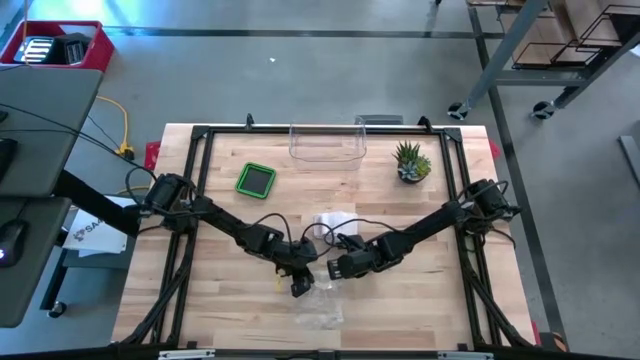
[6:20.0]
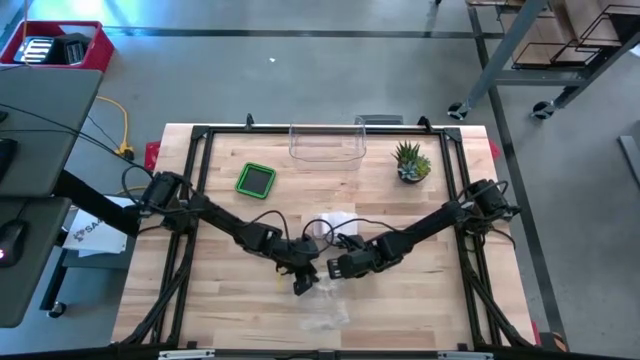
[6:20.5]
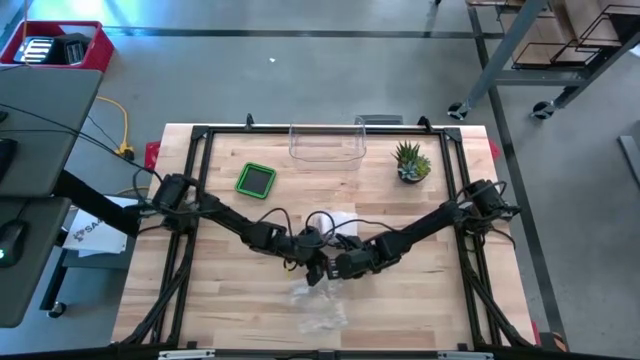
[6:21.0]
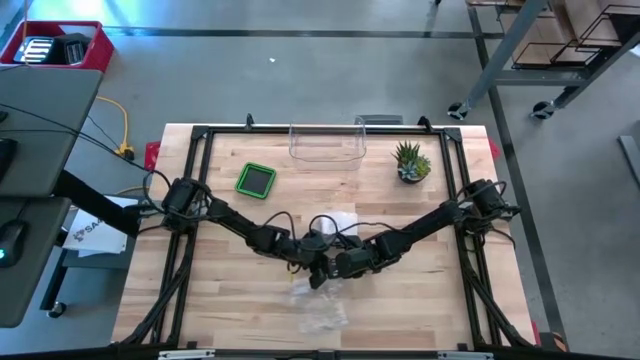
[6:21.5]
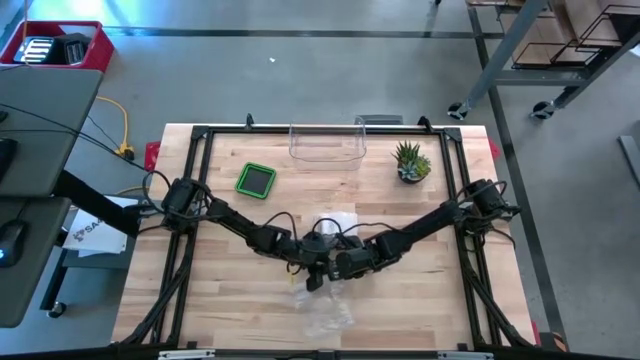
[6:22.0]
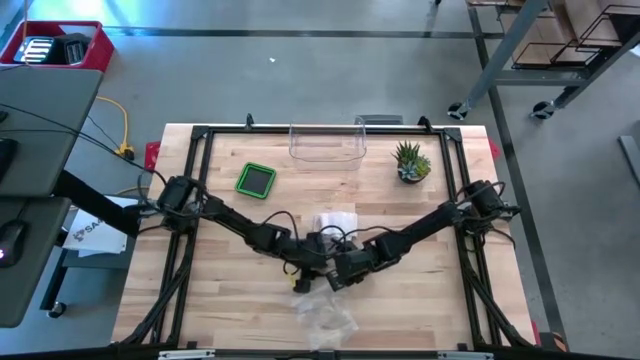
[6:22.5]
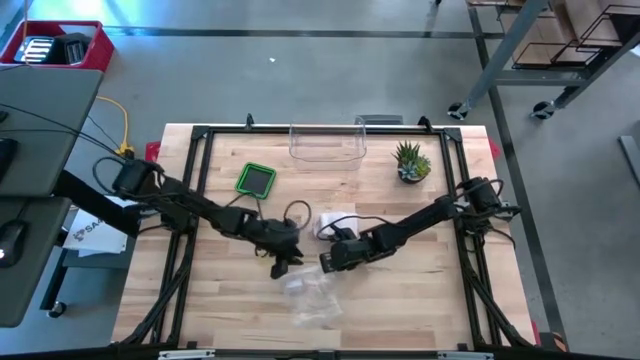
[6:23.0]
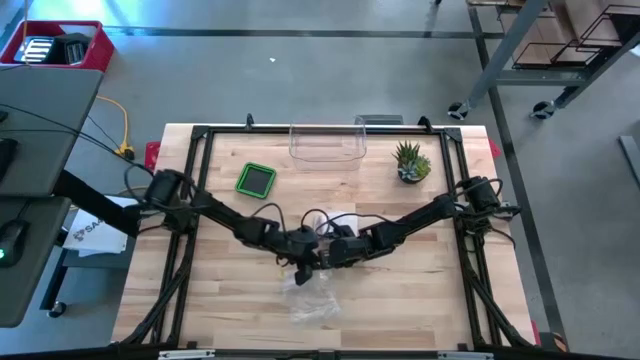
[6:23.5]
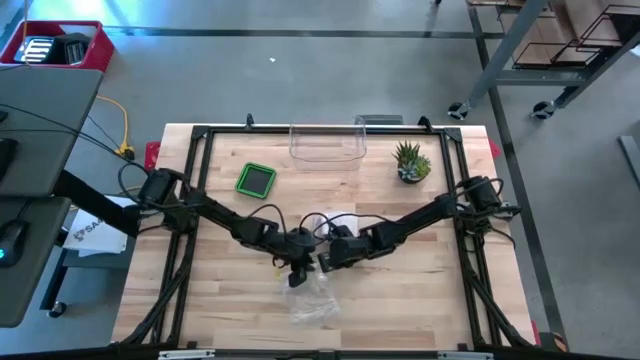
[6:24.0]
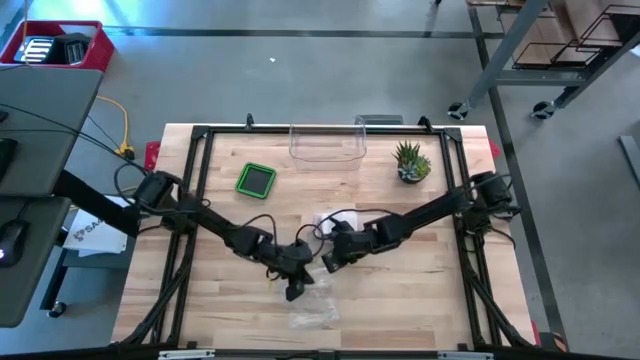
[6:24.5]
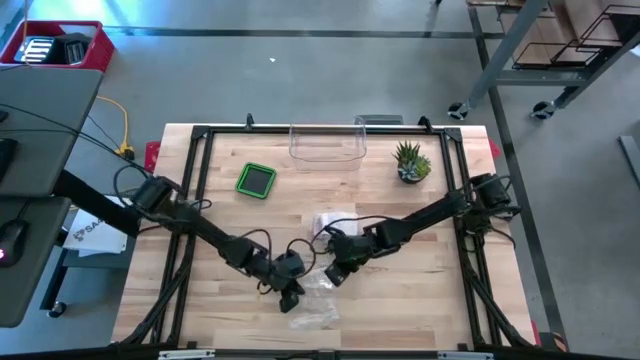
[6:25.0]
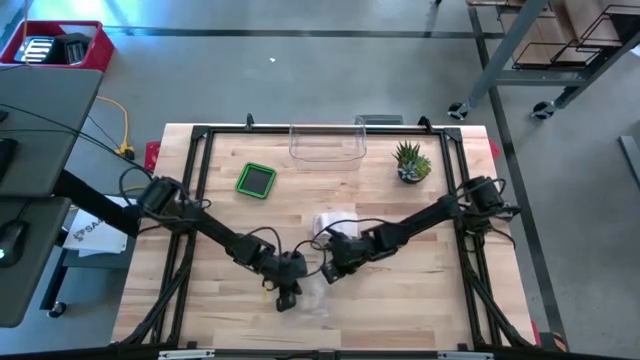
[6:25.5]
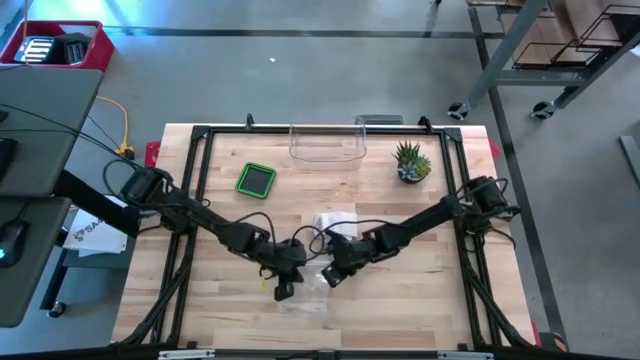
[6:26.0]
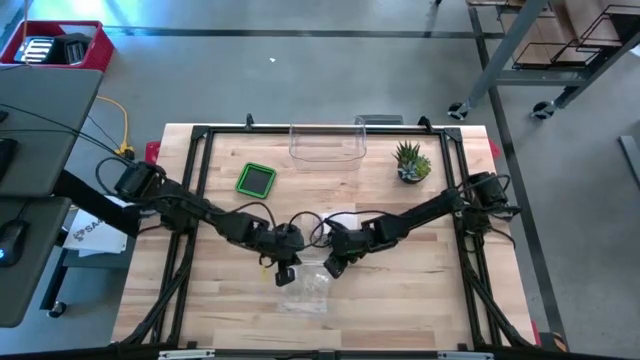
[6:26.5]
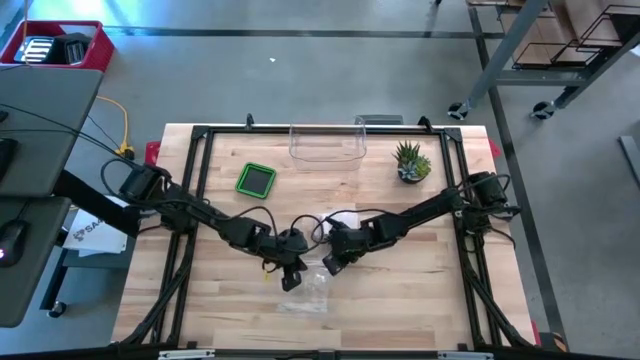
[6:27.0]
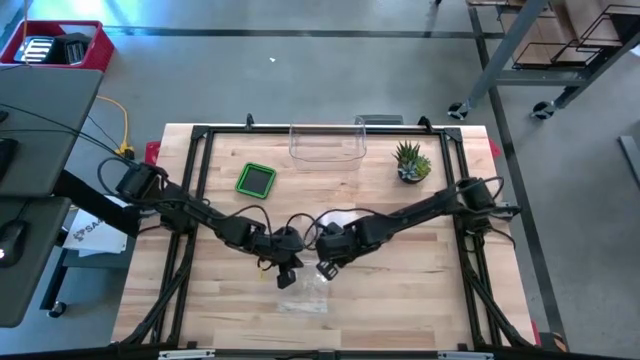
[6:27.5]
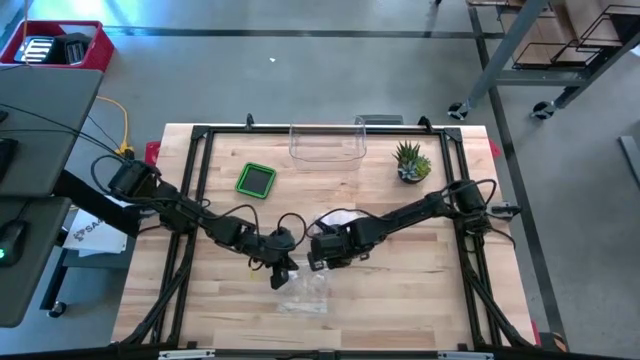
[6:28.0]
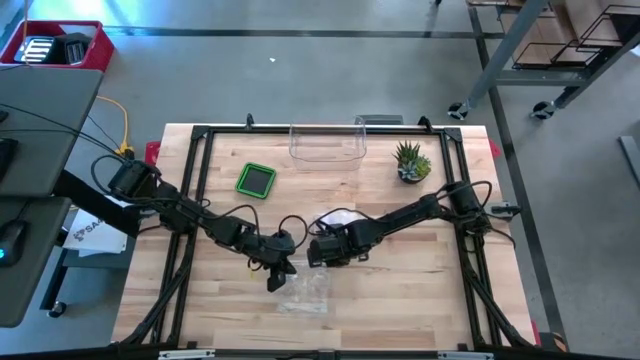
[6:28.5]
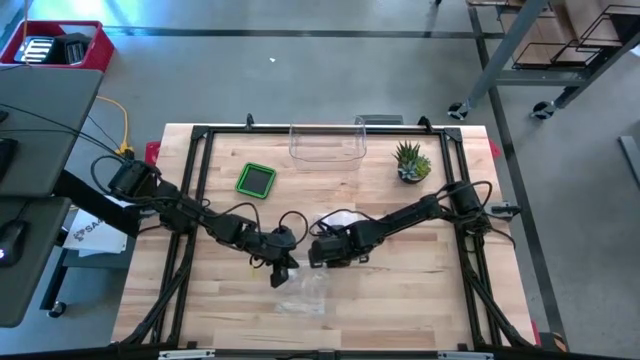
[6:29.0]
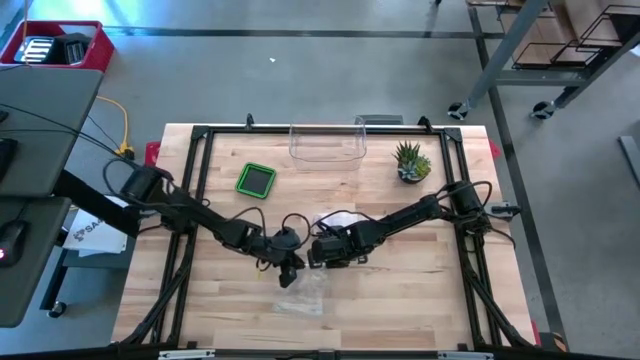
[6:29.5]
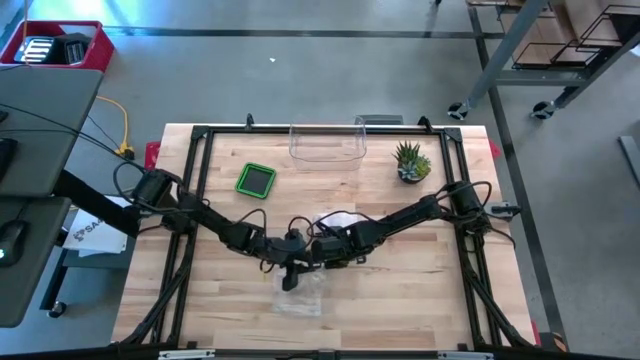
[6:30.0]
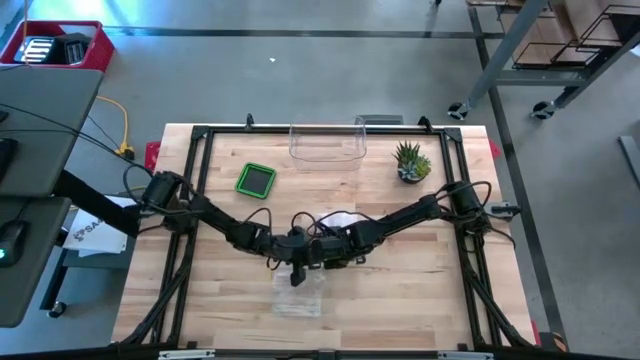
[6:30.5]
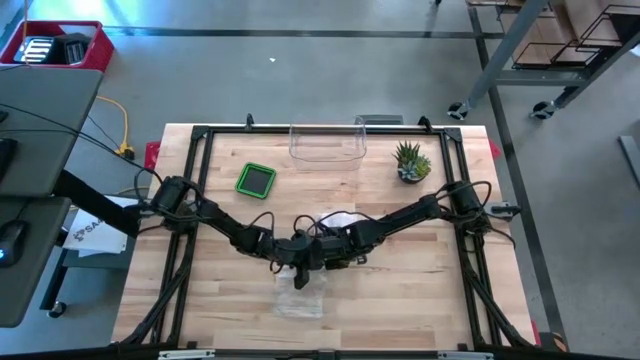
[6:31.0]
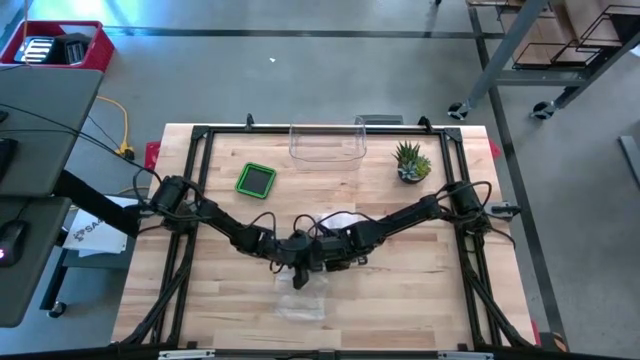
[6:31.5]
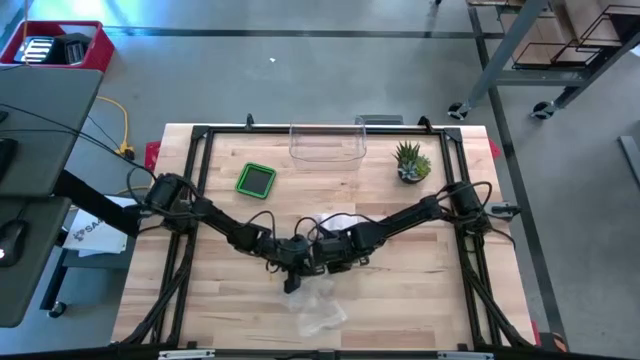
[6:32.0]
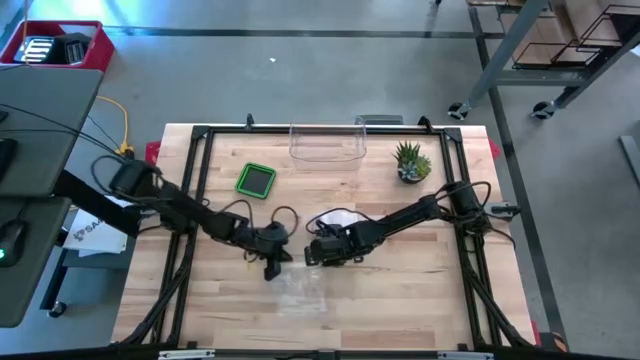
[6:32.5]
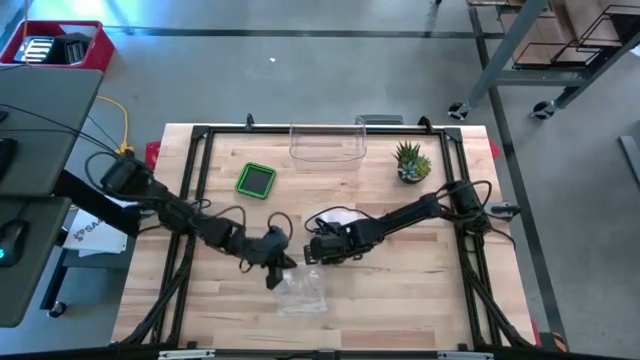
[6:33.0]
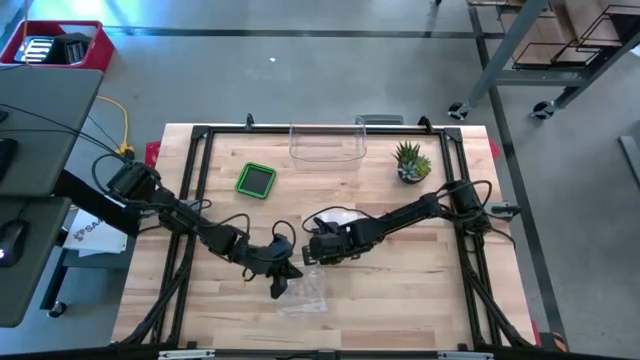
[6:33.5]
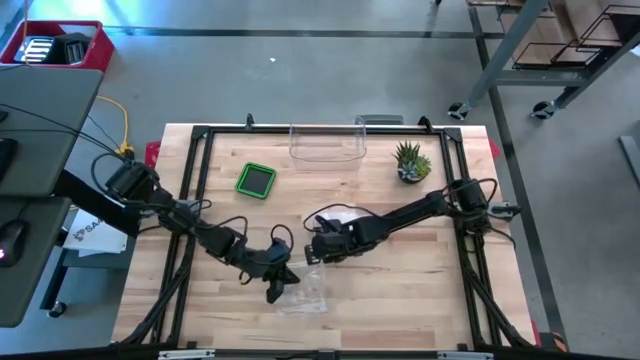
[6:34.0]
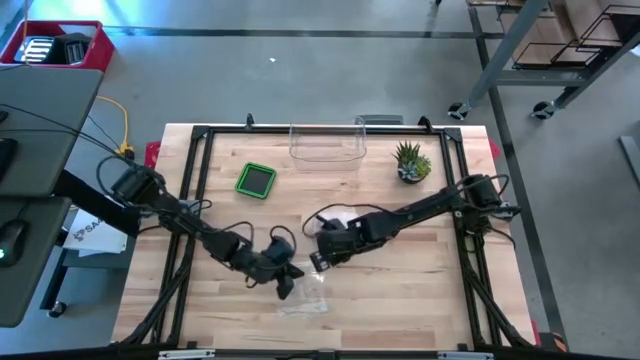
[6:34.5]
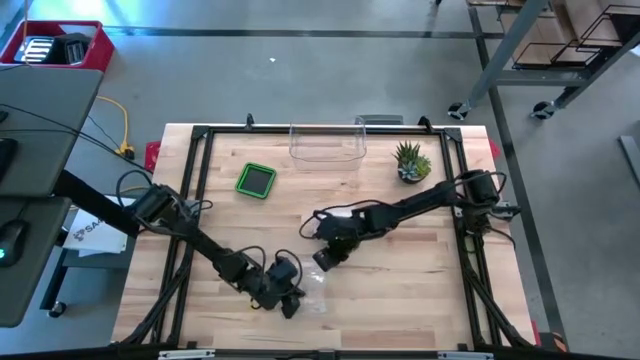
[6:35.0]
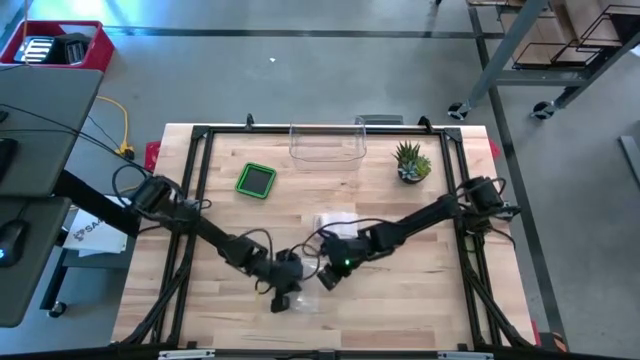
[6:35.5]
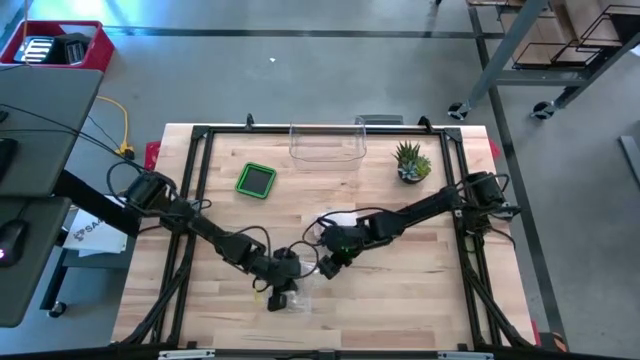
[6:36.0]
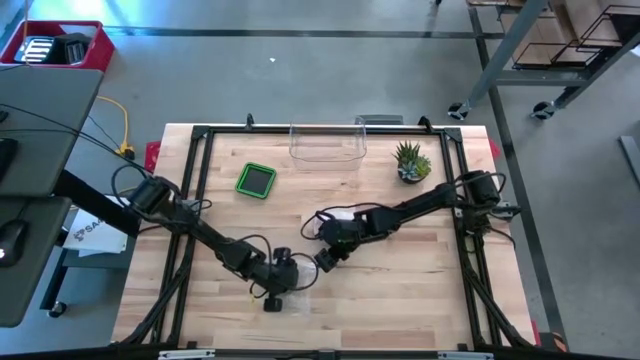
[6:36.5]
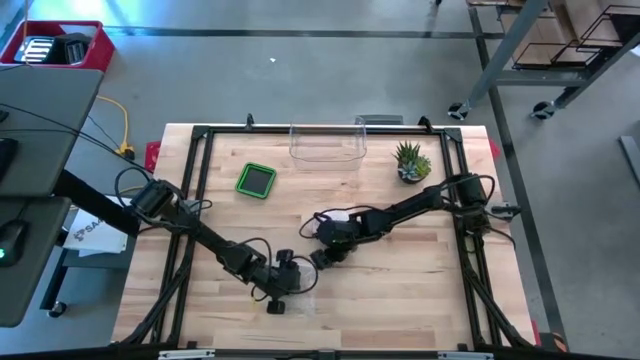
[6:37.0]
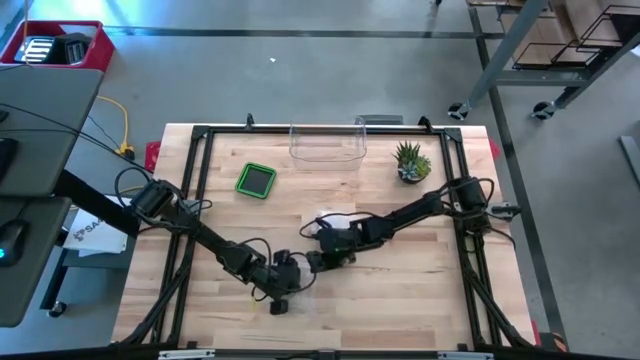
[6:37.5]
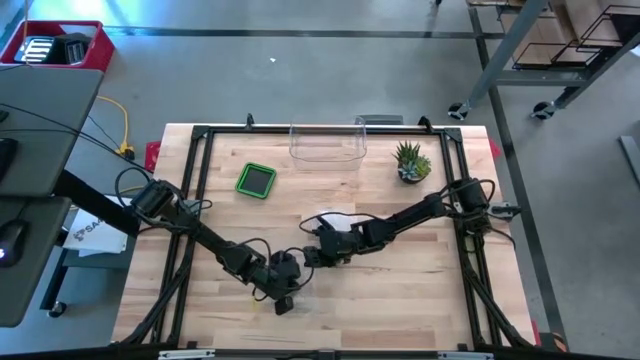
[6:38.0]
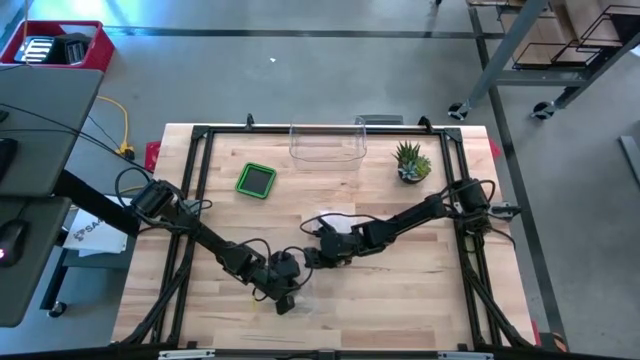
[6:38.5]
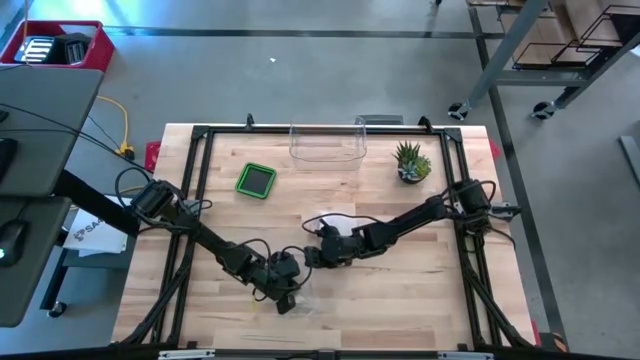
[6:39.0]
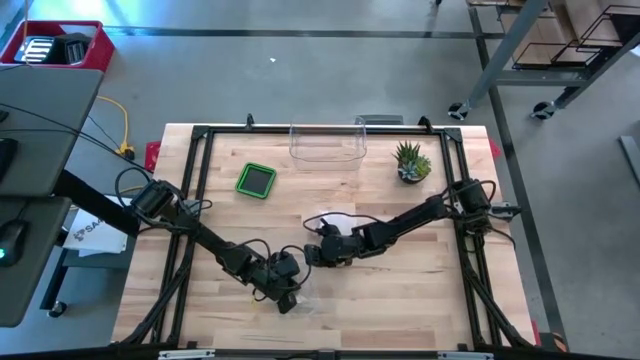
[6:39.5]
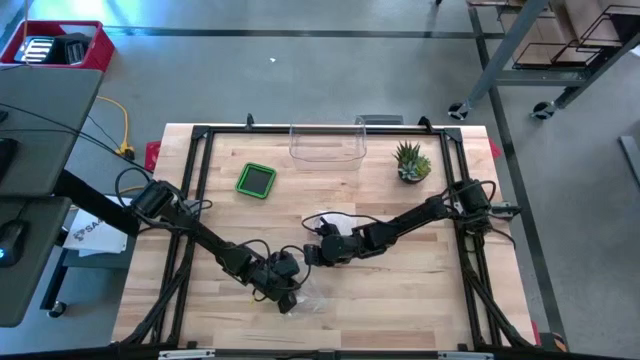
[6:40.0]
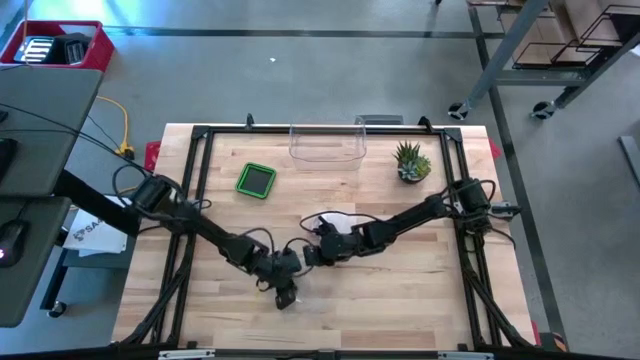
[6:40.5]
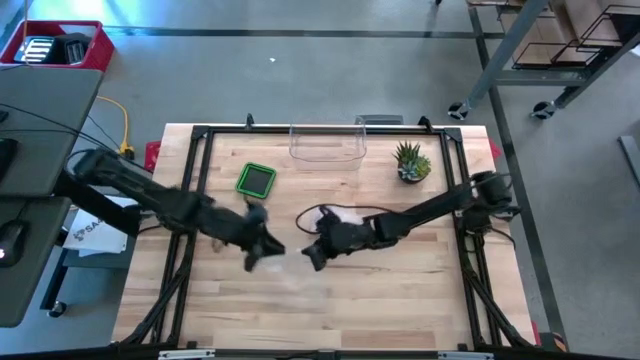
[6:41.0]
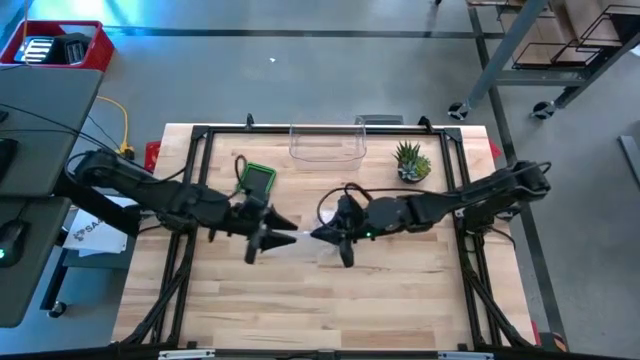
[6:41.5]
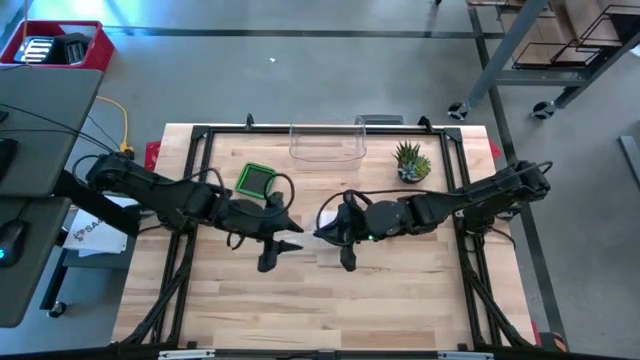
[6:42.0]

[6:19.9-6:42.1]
Task: Roll bandage
Open the transparent zip bag
